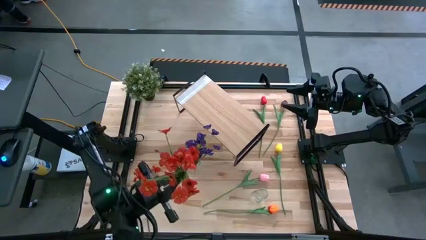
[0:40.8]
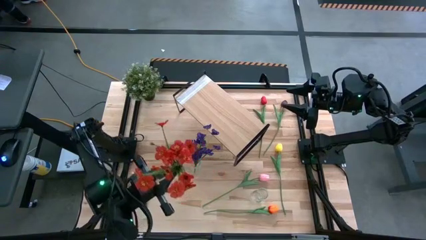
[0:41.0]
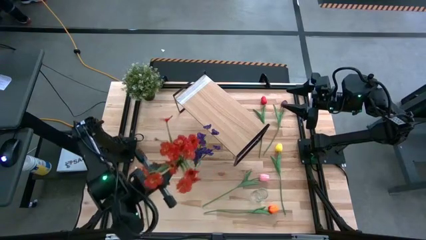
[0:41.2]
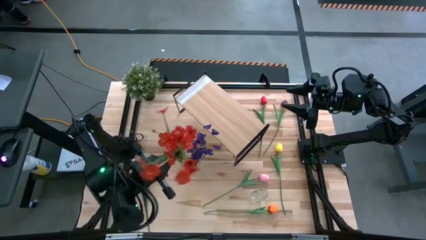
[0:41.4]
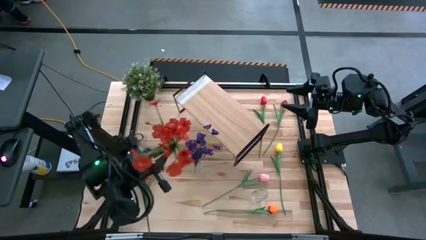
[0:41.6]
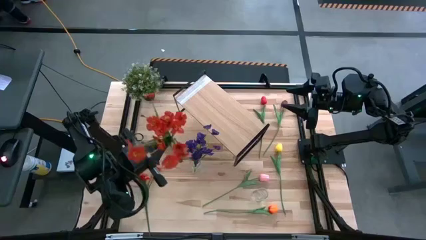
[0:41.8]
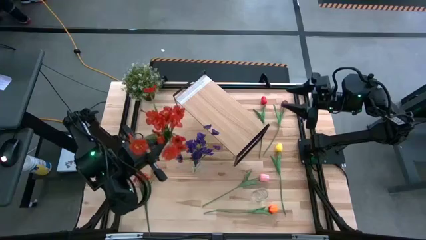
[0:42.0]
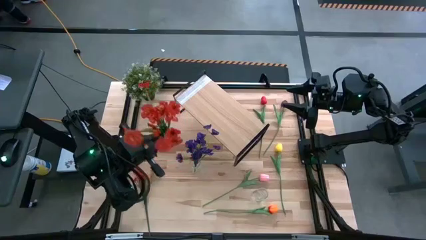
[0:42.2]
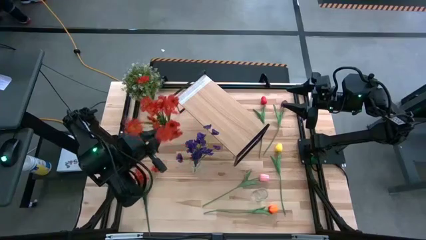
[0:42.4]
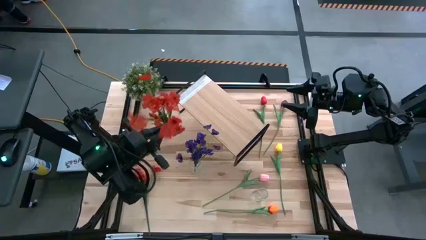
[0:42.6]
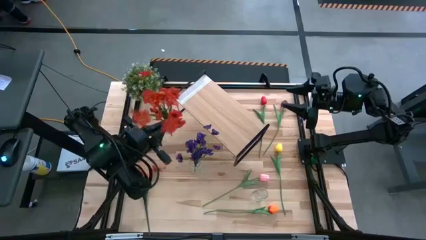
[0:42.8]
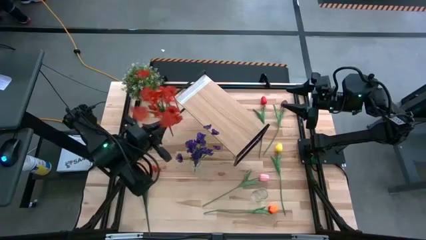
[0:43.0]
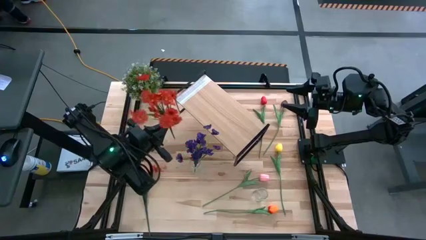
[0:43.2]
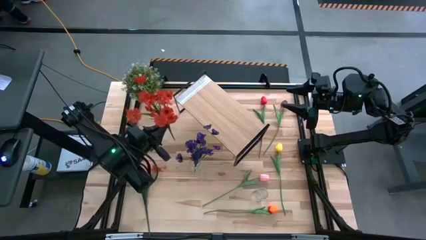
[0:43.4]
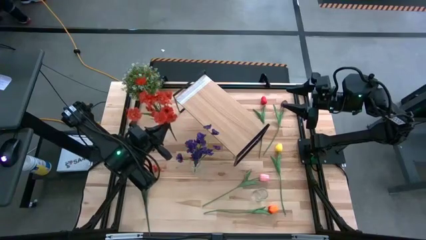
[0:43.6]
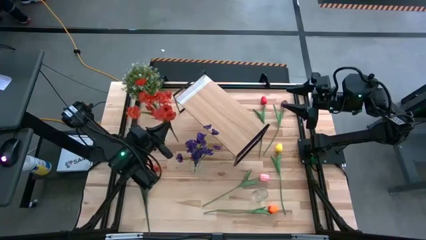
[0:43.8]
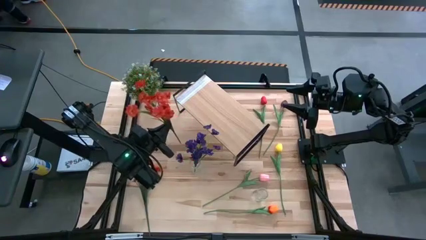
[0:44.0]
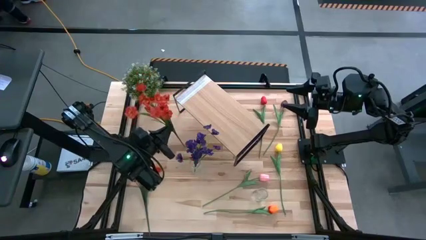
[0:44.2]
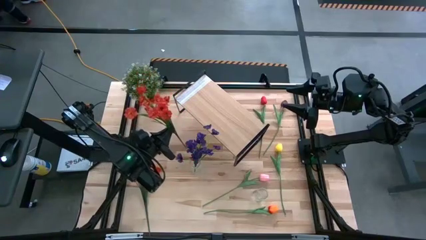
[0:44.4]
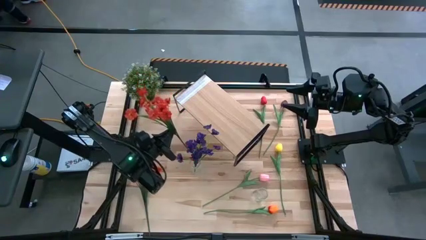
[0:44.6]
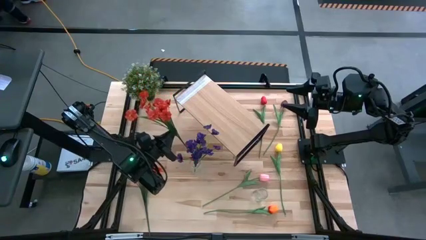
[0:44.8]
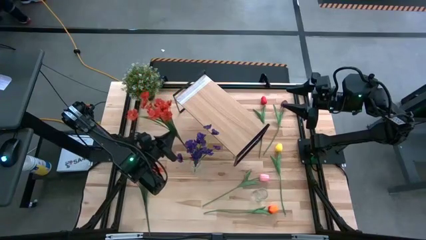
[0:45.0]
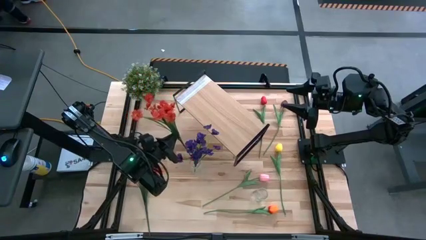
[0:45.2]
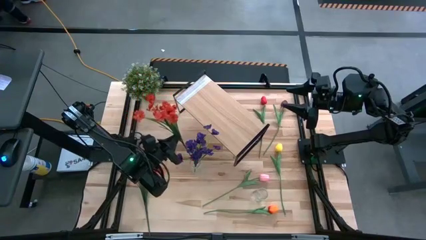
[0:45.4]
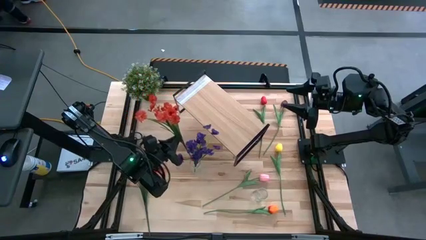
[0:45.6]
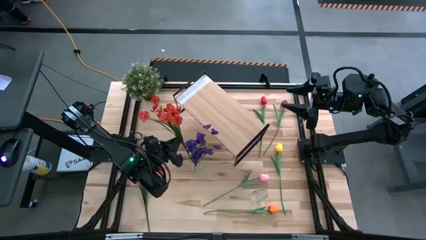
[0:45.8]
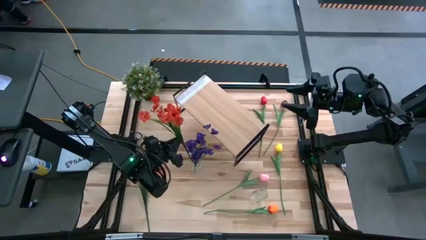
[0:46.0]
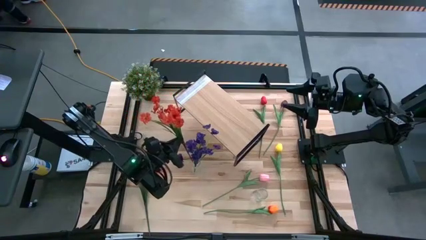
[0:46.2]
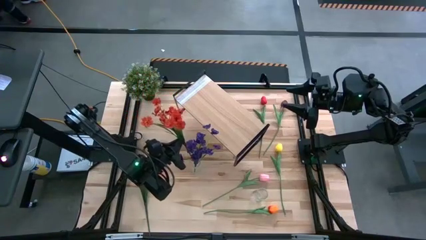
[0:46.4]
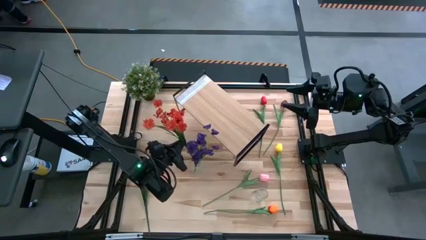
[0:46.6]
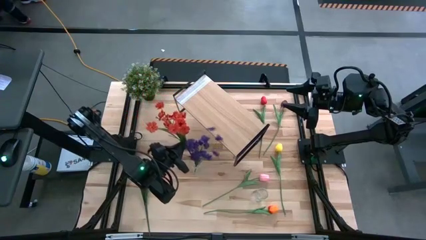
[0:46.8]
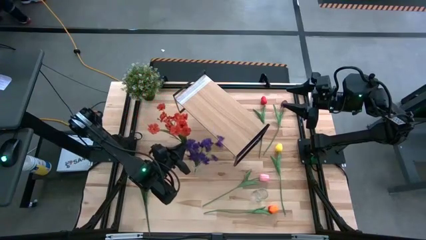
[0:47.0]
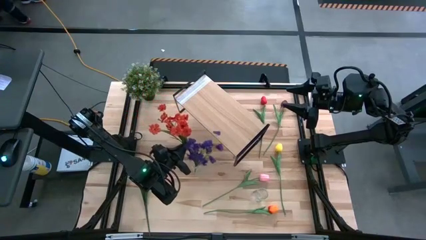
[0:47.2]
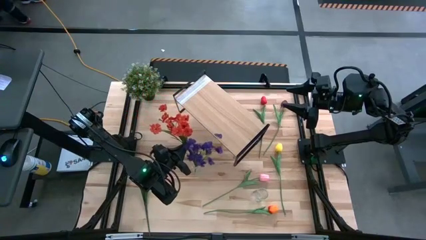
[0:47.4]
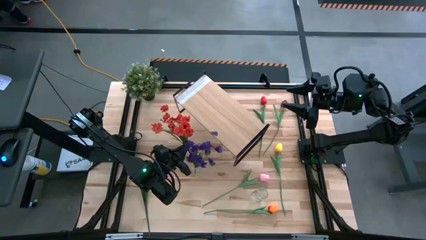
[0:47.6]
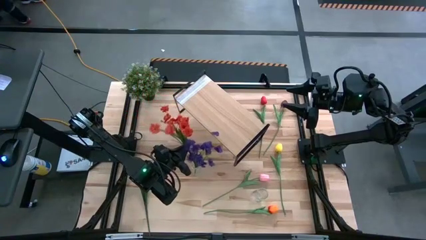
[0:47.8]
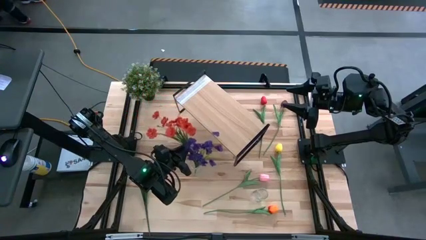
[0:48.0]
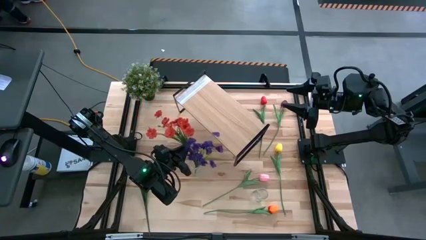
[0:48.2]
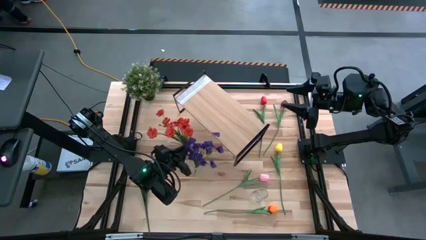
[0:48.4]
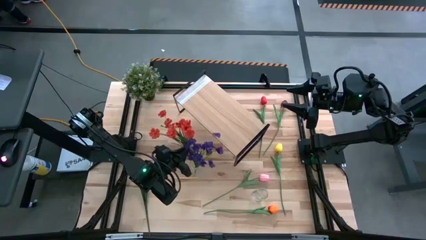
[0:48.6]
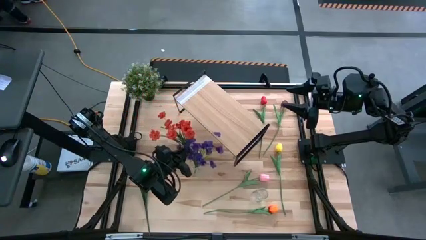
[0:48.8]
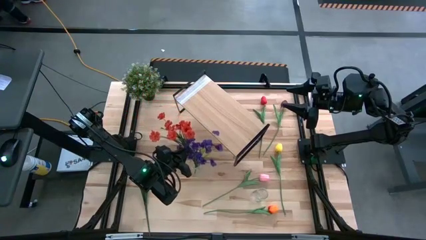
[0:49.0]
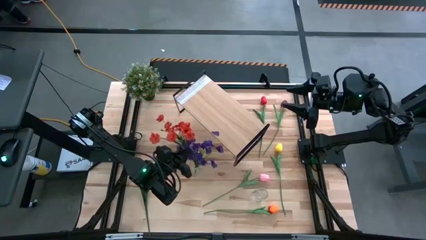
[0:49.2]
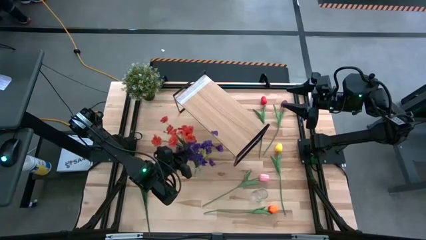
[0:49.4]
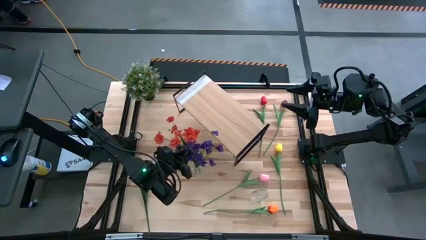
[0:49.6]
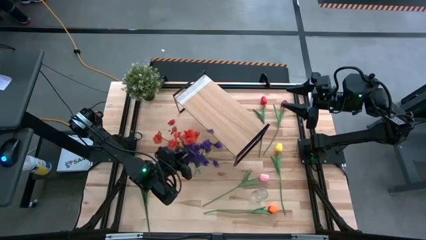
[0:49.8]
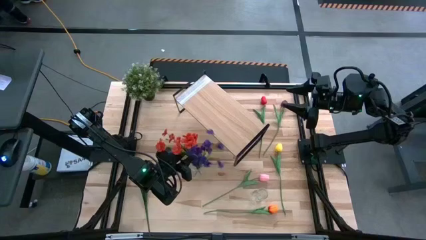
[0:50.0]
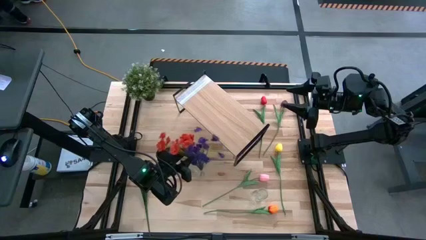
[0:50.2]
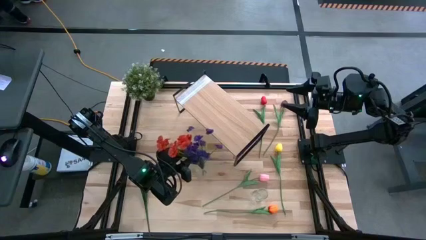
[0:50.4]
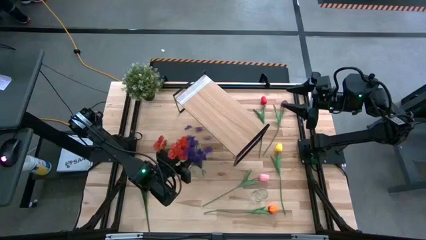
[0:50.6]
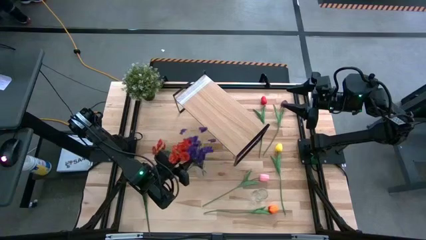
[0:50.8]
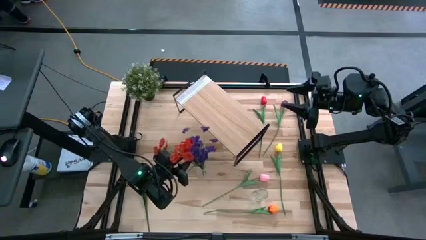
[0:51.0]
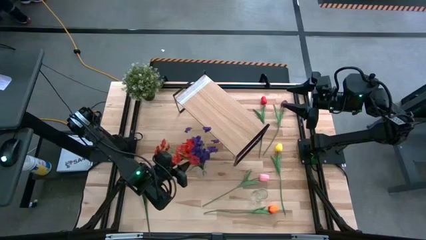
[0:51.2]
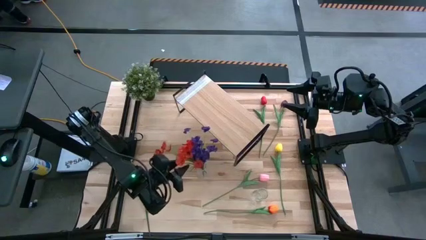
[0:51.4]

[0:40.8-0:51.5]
Task: Pick and place flowers into a vace then onto a shelf
Put the right orange flower into the left transparent vase
